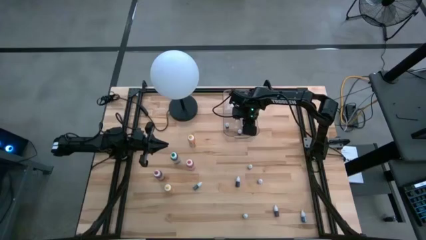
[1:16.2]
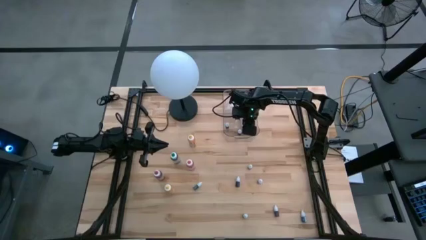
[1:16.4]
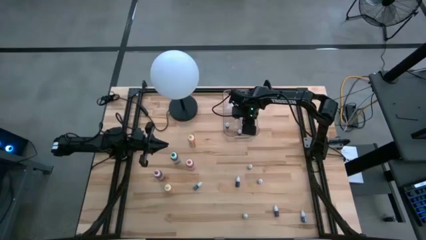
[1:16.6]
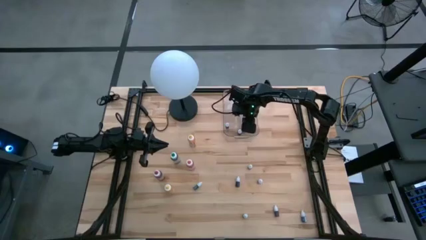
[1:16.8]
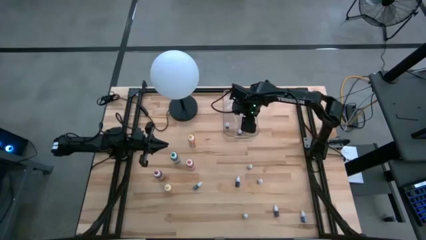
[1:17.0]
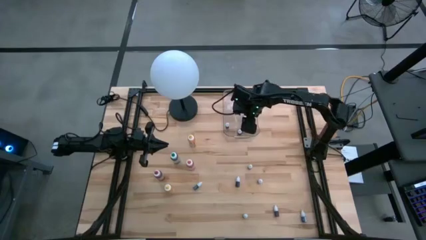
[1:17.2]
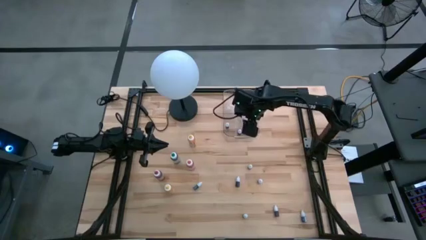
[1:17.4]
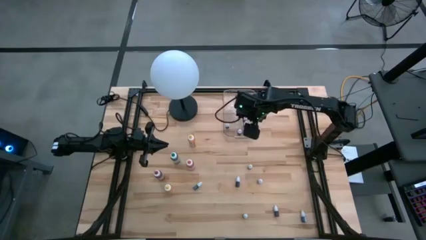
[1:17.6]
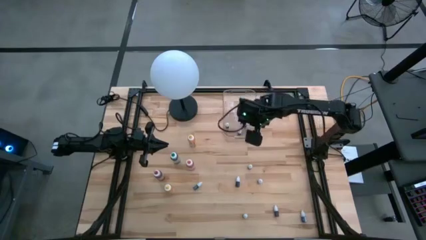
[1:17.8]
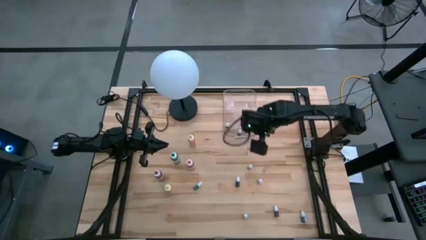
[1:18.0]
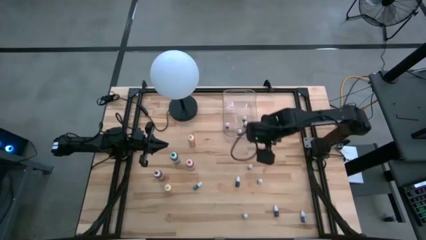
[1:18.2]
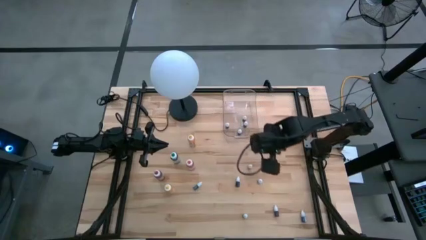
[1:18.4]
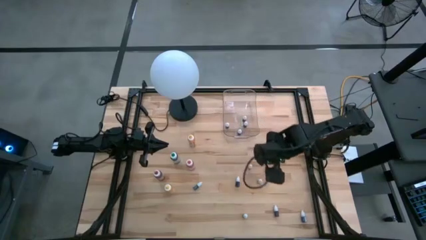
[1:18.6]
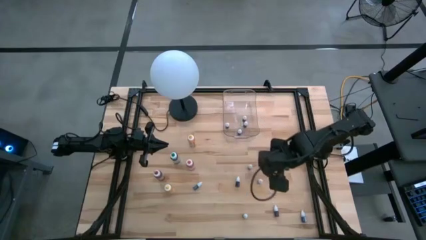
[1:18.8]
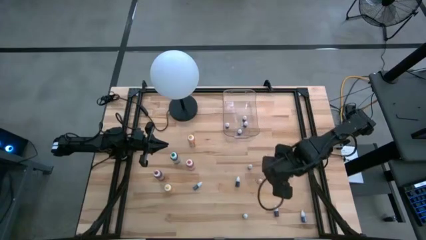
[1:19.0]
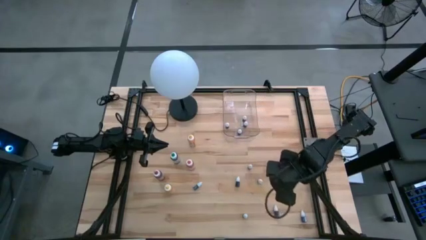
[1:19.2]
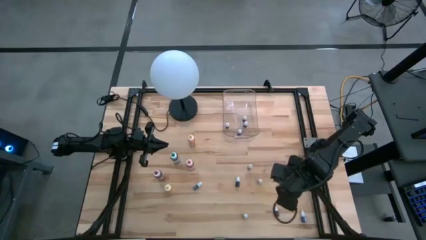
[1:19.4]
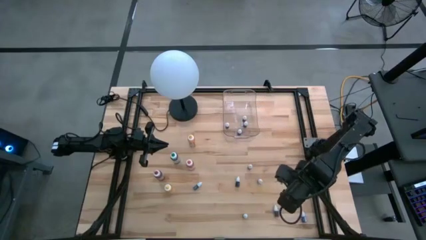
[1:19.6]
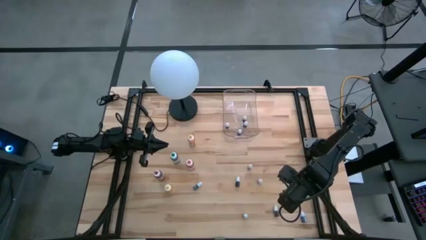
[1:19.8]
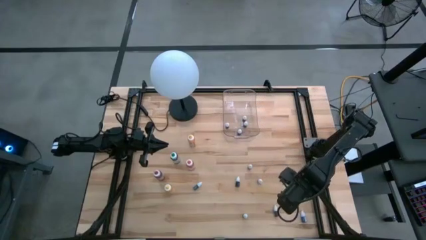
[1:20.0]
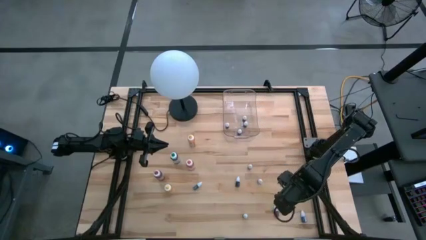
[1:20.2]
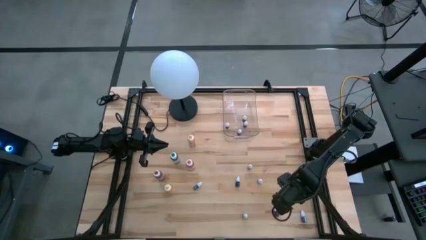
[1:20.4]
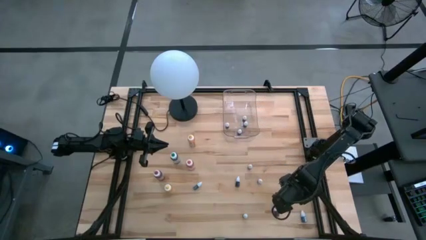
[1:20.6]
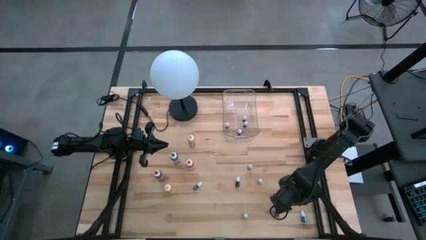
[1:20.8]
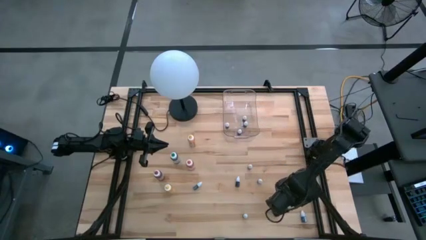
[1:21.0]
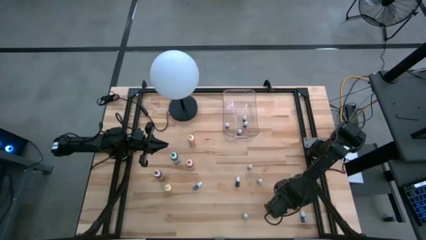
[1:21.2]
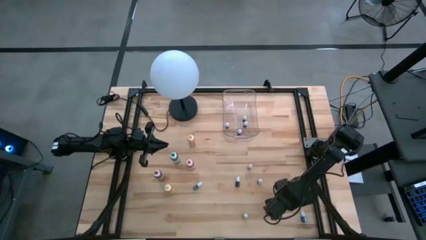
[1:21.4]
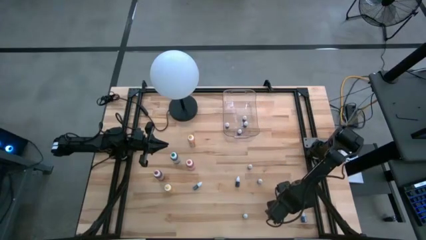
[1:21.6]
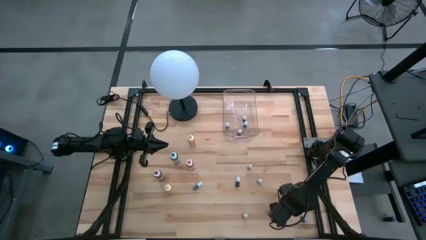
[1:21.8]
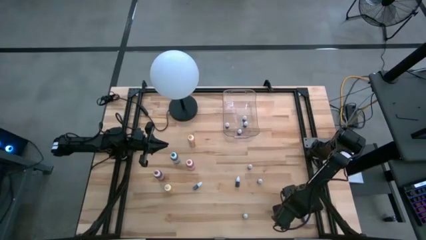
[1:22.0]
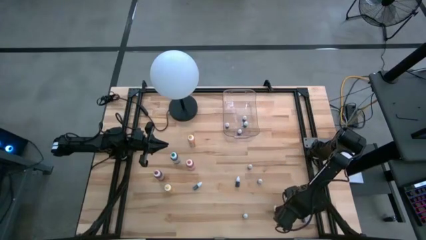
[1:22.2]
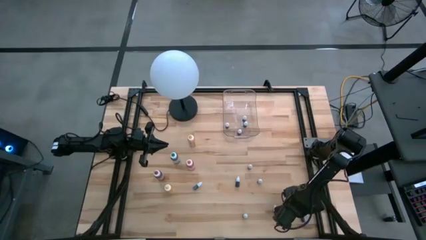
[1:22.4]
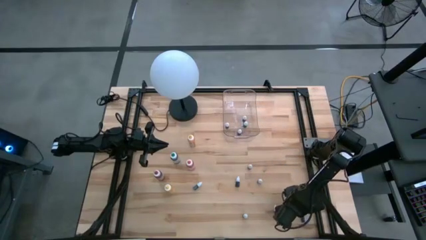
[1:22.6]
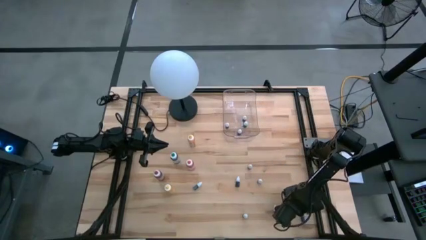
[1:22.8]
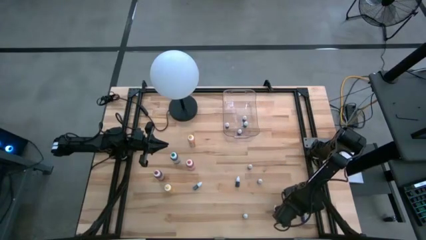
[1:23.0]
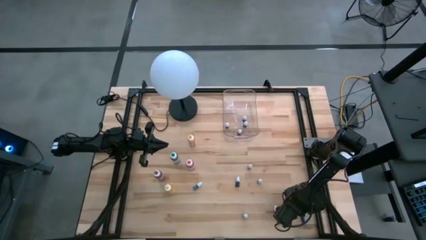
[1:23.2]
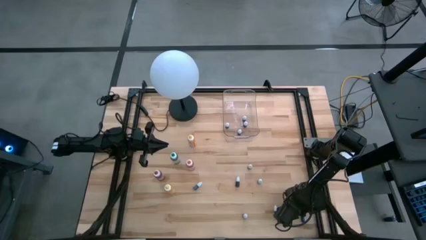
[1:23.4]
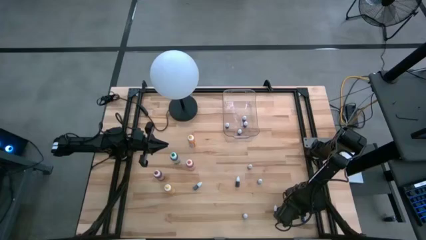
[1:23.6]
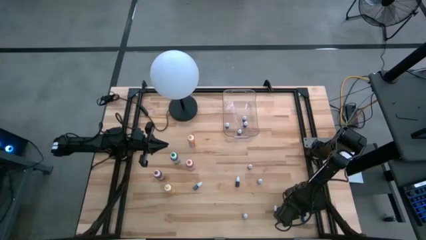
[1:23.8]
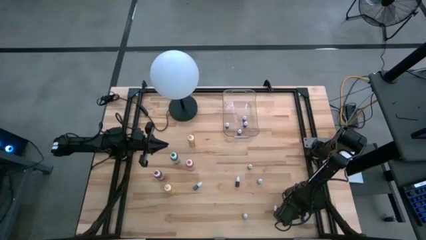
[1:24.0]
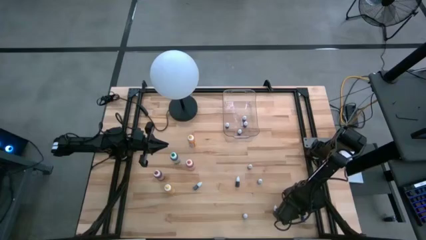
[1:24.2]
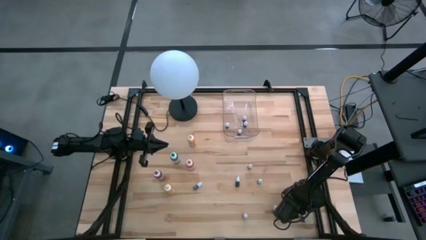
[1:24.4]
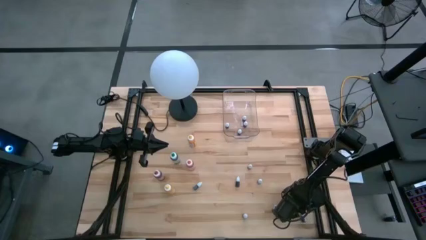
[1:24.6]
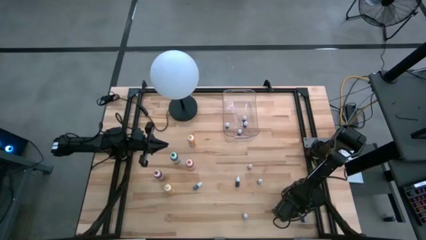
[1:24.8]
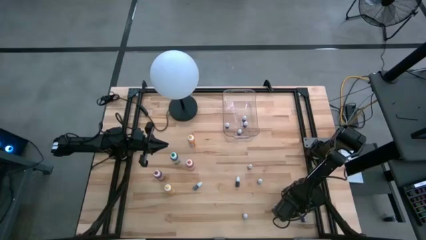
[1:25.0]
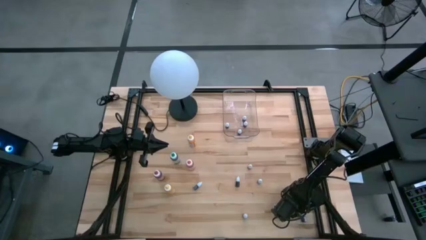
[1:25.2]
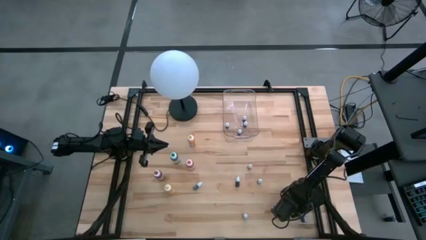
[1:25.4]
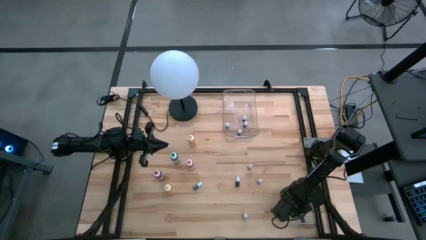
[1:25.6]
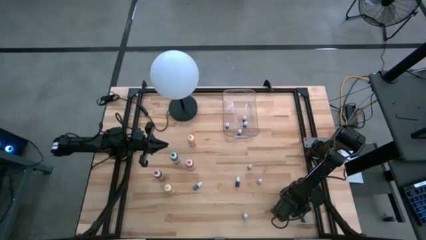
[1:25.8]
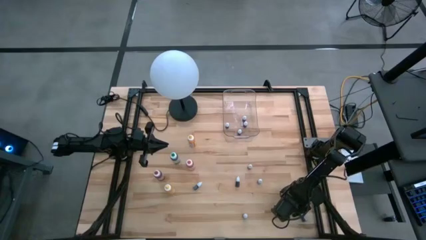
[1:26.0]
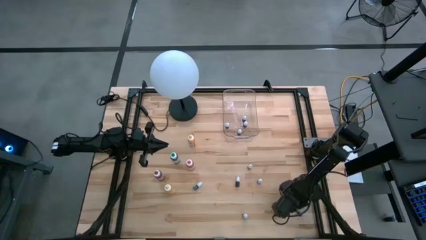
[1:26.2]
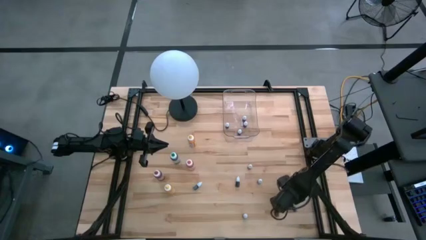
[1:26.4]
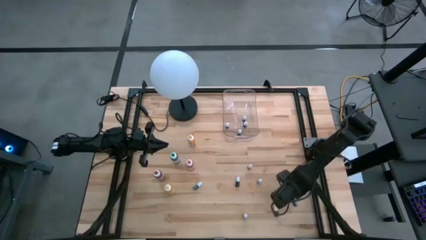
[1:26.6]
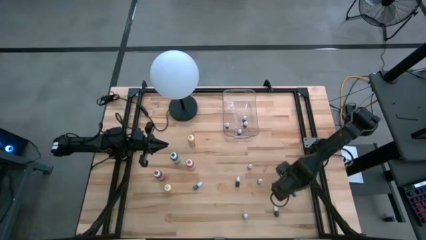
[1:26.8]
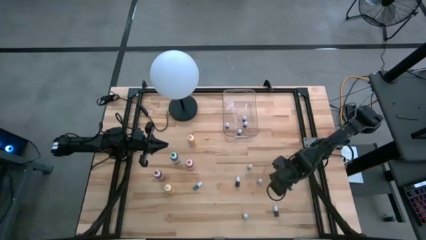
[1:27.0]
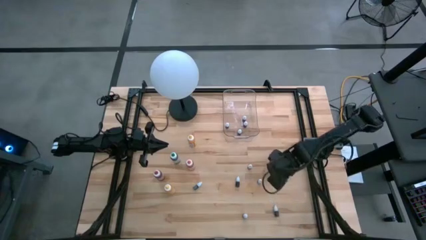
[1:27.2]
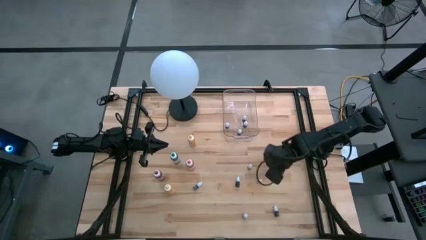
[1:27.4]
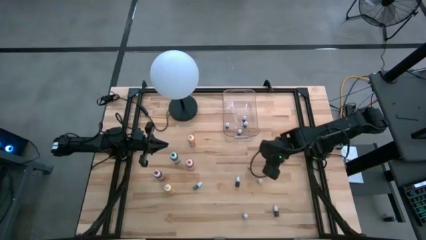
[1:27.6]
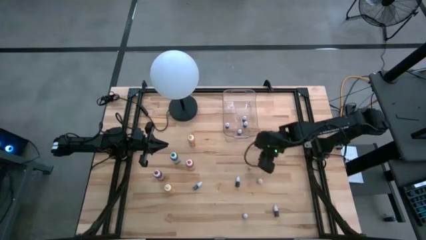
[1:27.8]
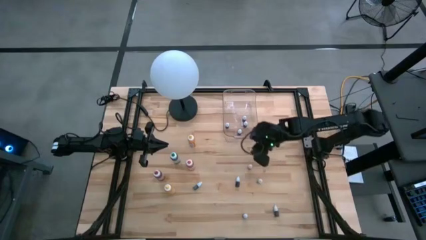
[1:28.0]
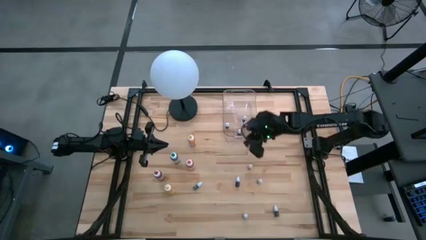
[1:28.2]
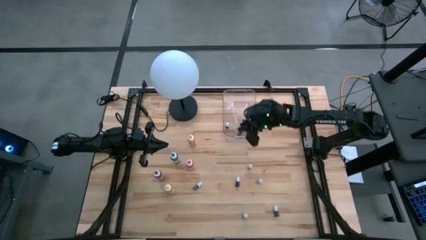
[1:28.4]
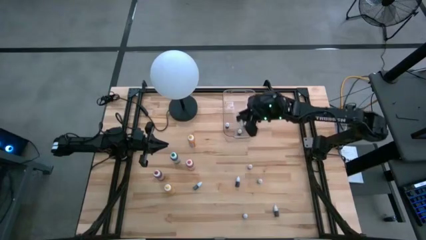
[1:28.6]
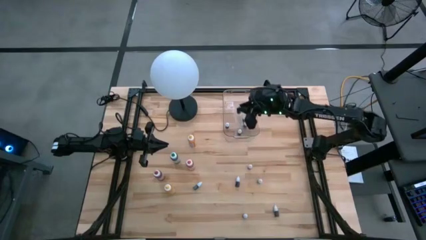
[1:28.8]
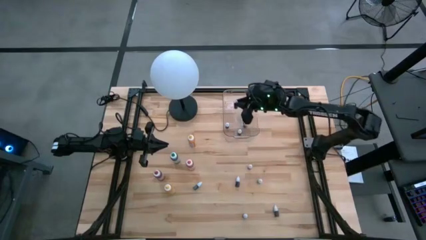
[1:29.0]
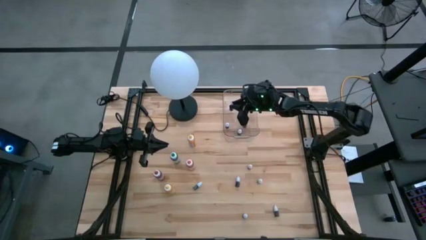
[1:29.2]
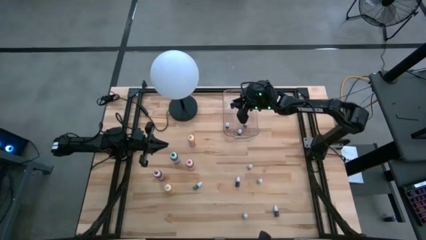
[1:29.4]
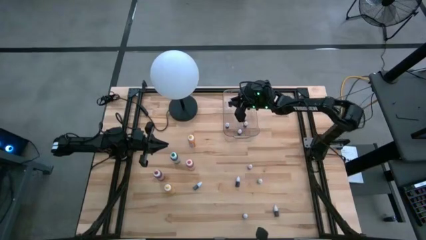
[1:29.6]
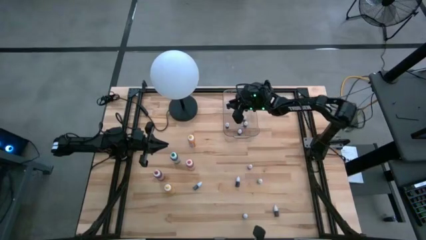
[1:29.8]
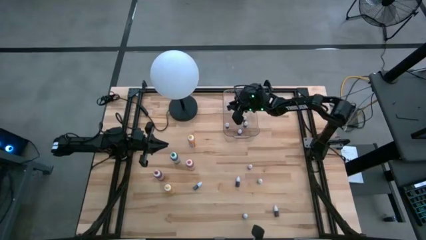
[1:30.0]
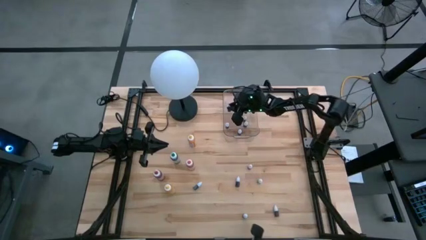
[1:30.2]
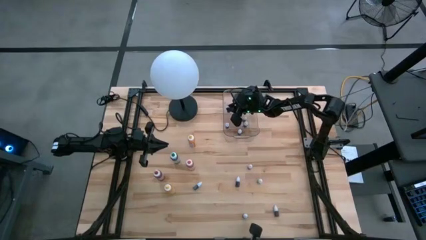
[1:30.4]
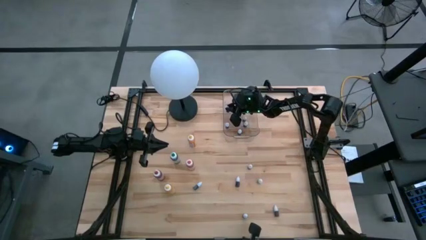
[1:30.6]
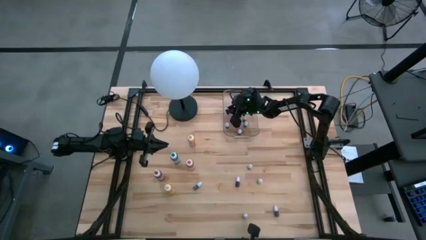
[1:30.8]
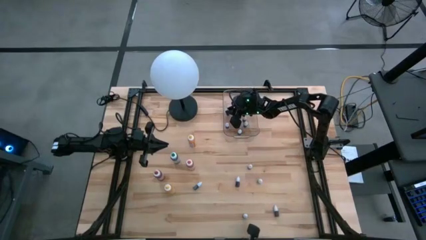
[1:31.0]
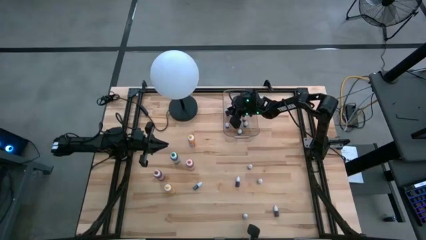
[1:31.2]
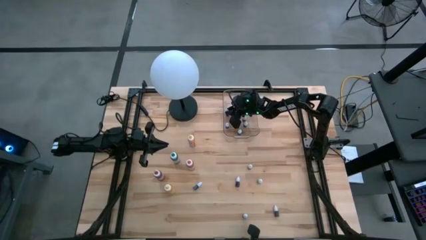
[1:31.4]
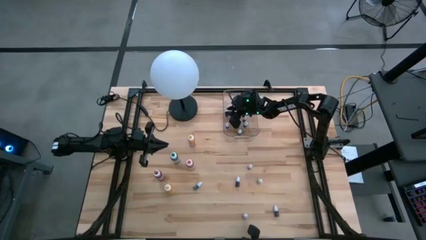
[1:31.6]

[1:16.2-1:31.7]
Task: Pick & Place food coloring
Put the small dark blue food coloring bottle into the transparent bin
